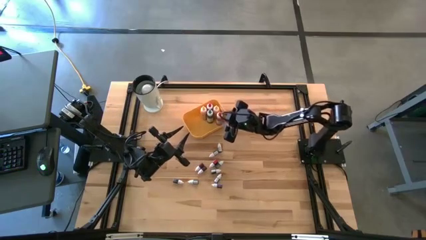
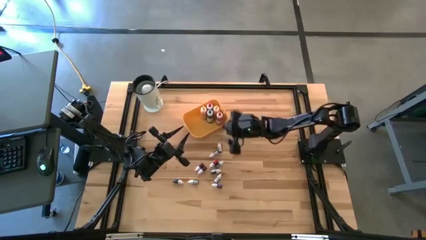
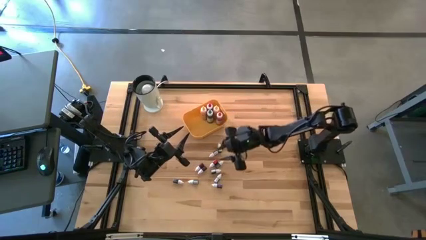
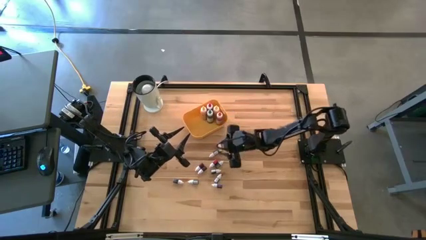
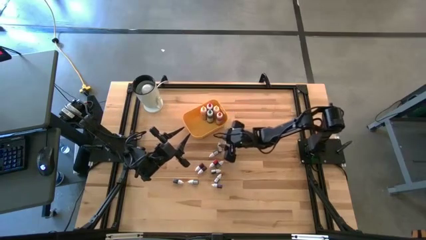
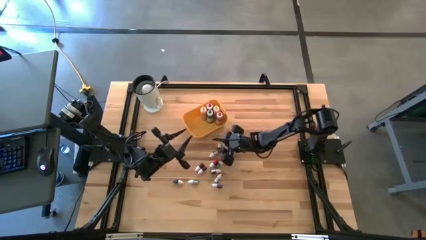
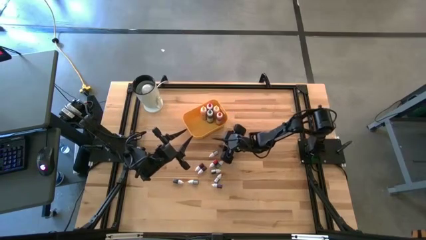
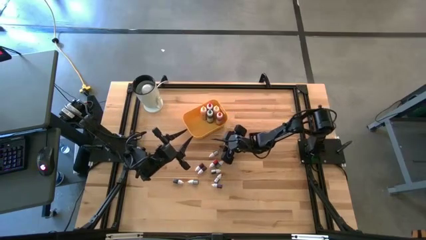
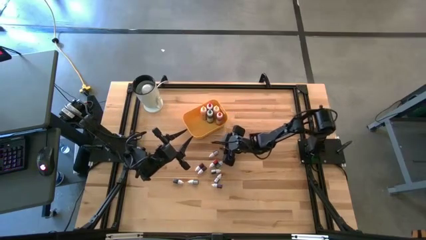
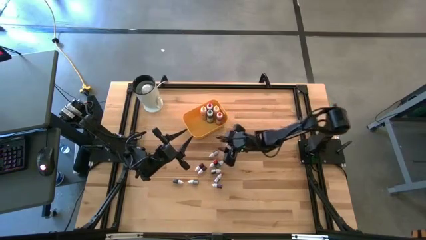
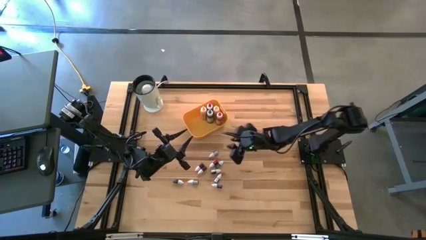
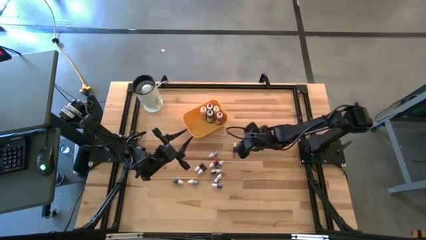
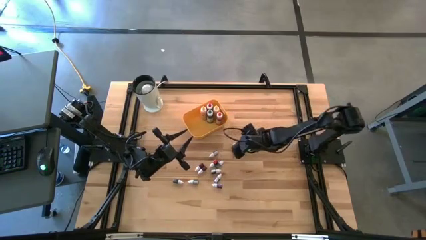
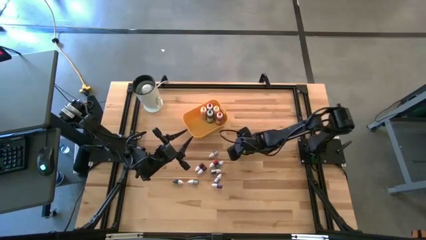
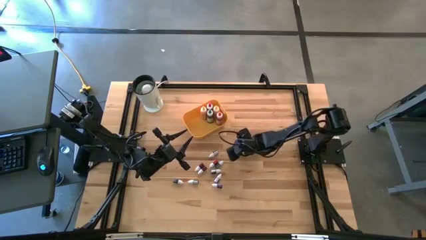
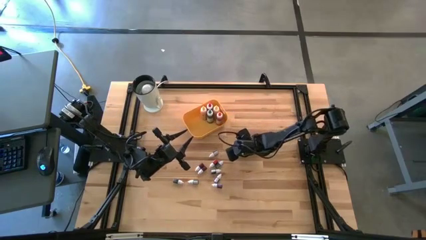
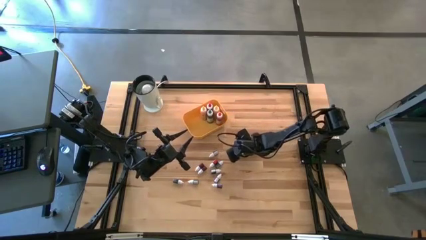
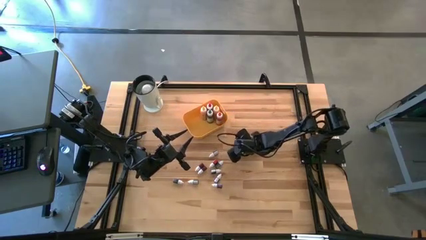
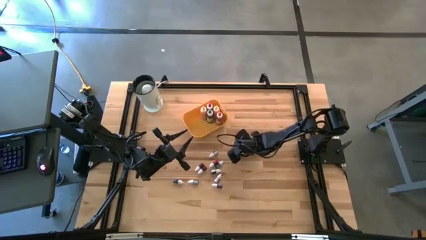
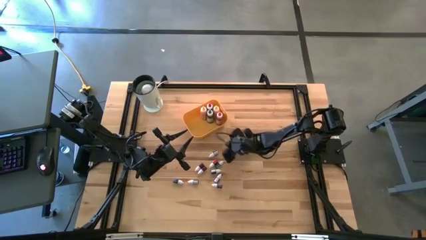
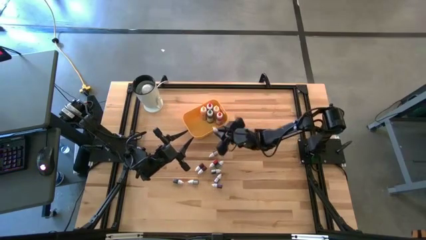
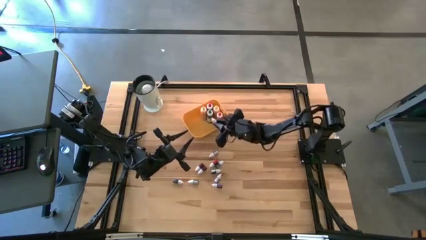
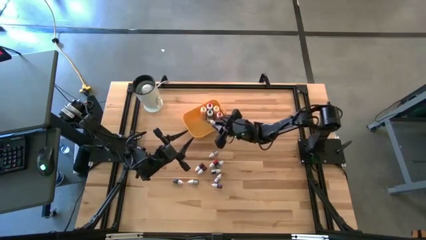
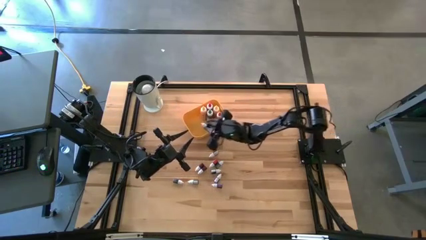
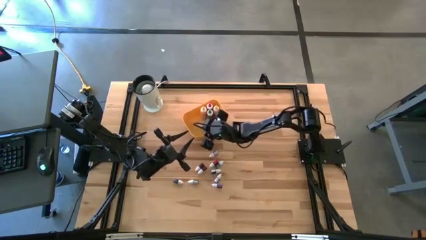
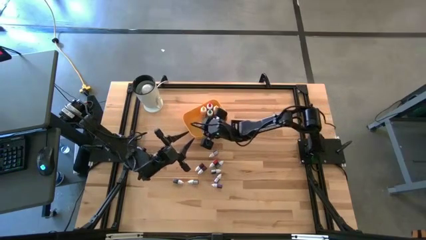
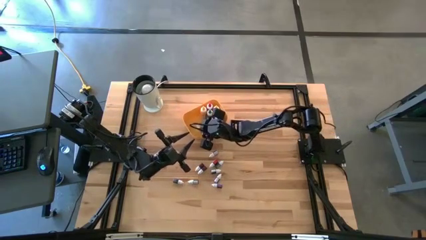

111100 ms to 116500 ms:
Task: Pick & Place food coloring
Put the small dark green food coloring bottle into the yellow bin

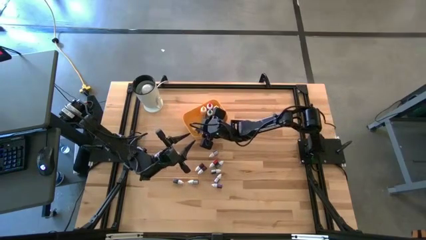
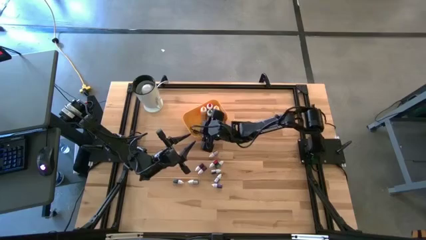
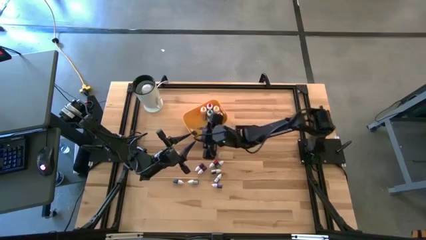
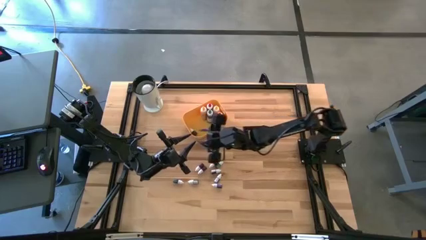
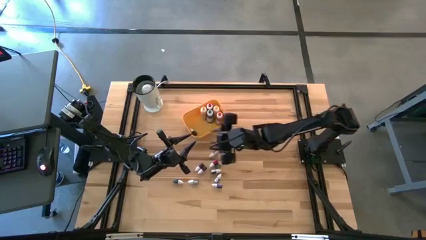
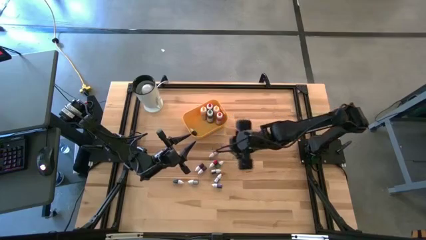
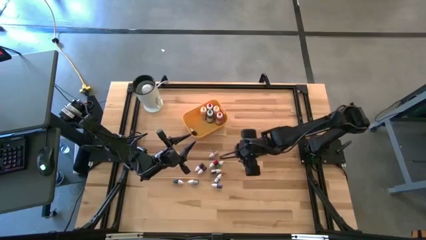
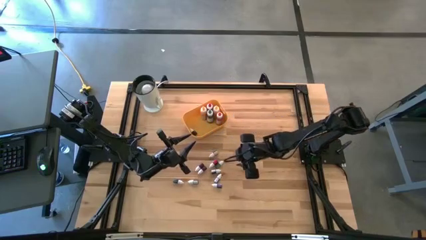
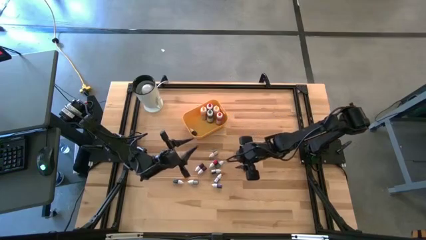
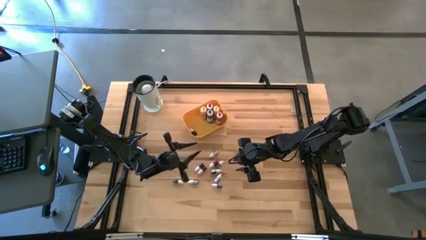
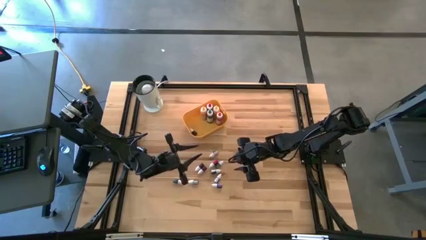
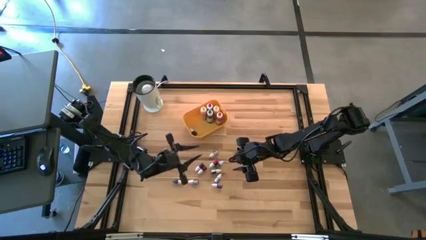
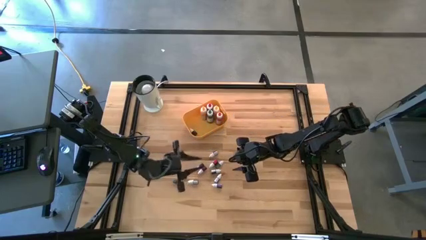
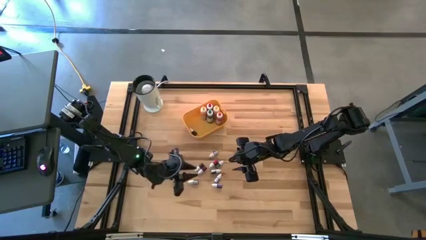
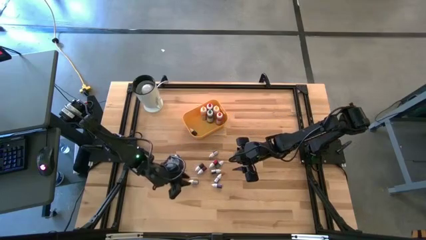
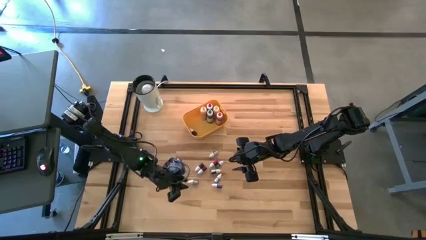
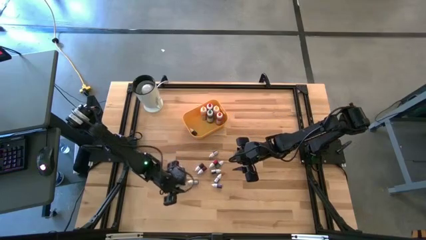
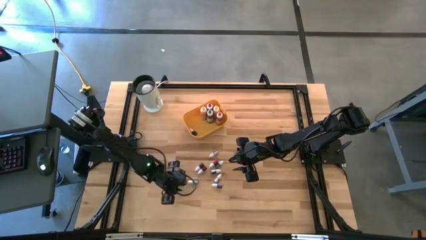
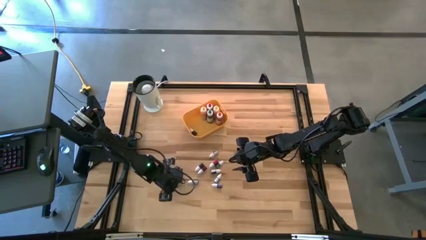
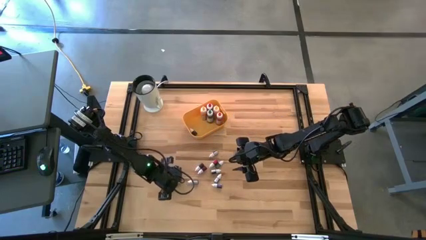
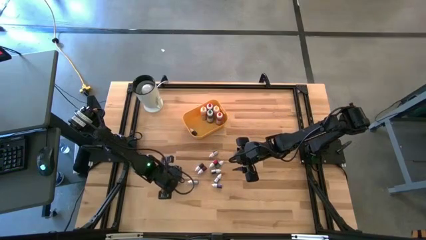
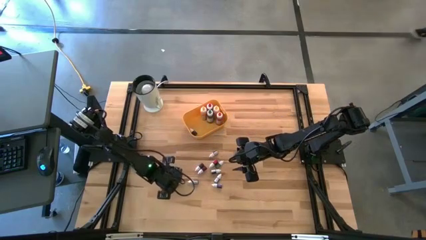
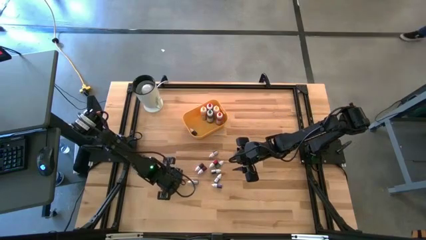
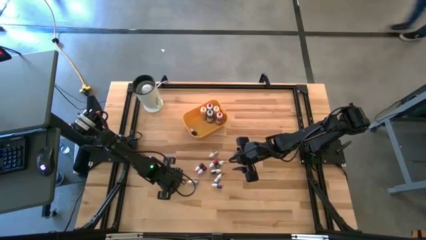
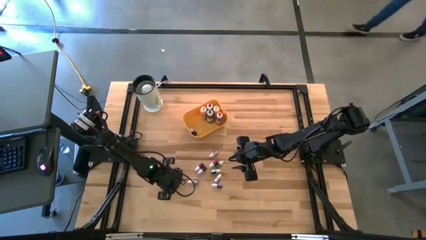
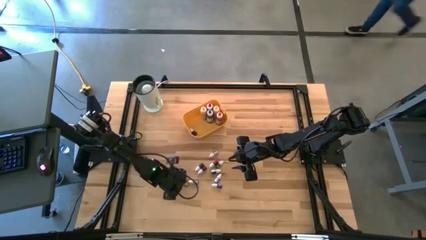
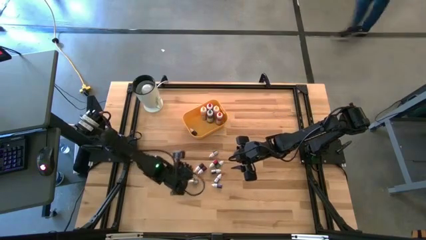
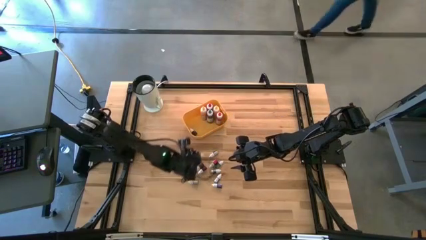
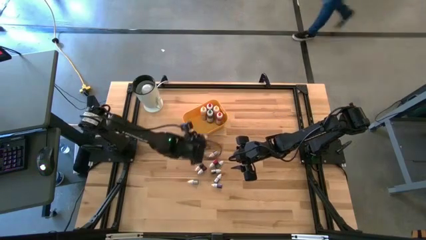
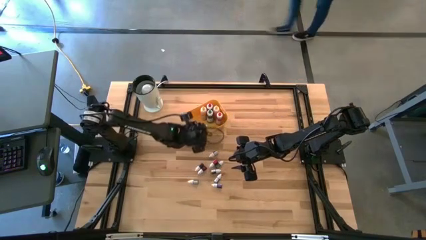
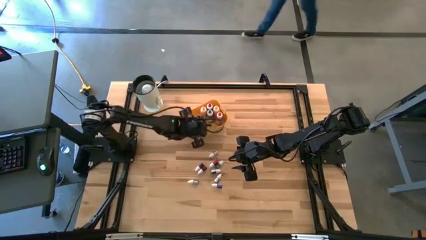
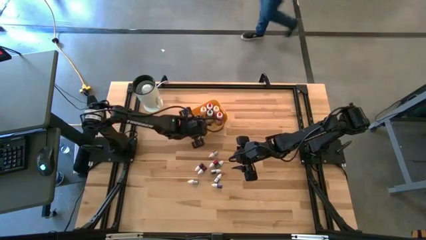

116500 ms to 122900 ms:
Put the small dark green food coloring bottle into the yellow bin

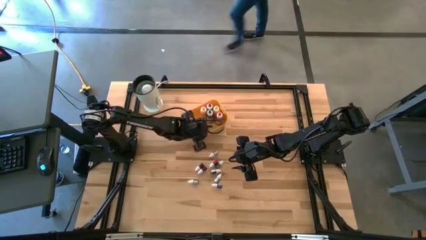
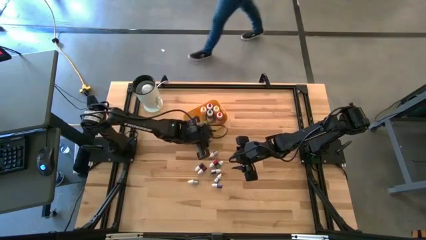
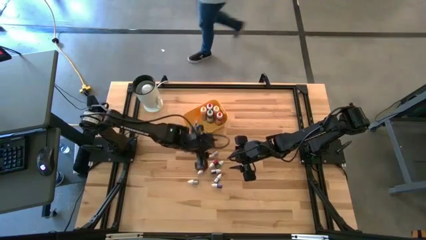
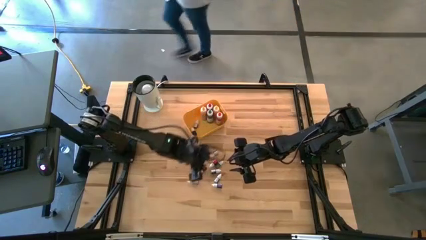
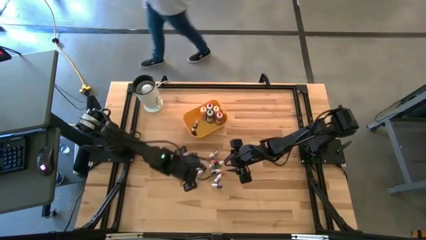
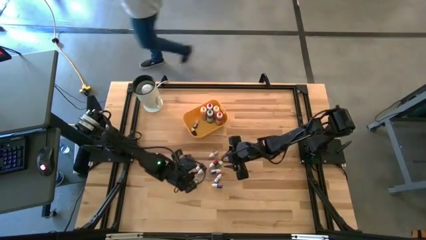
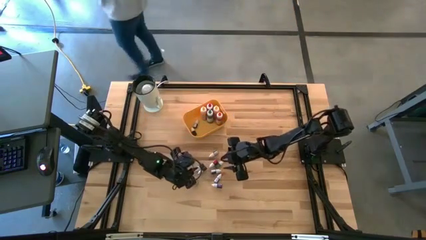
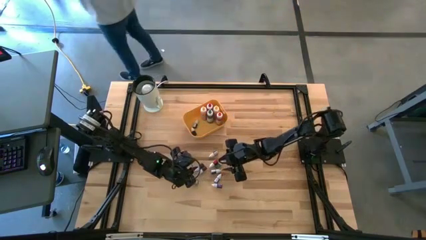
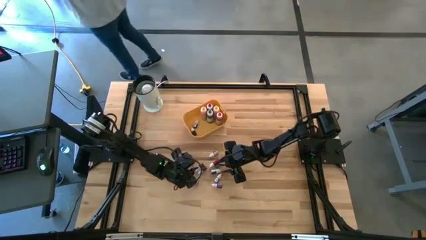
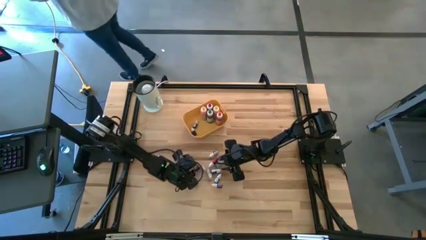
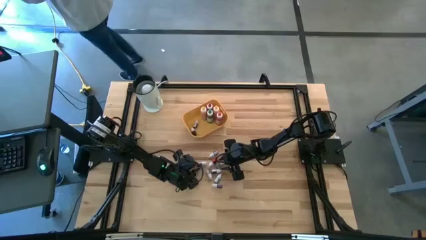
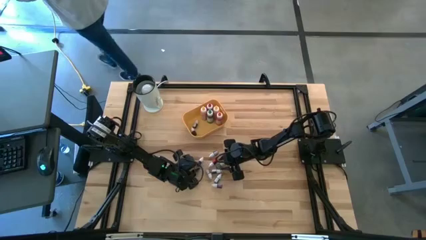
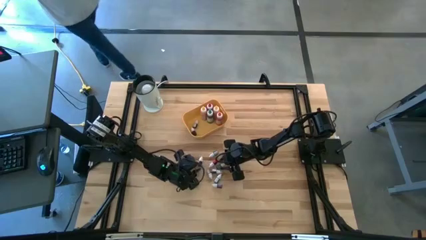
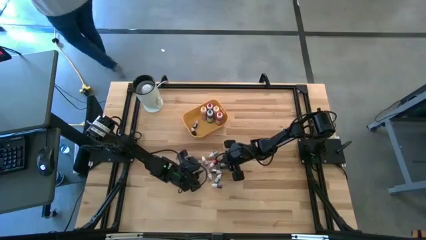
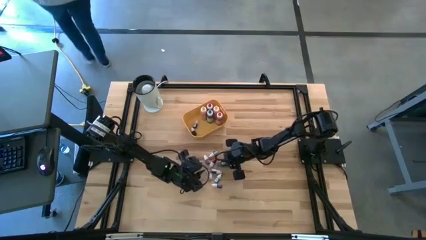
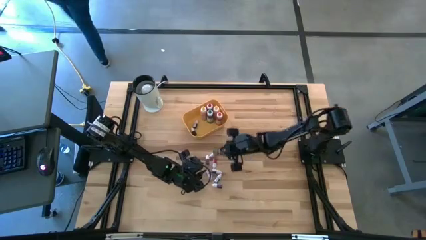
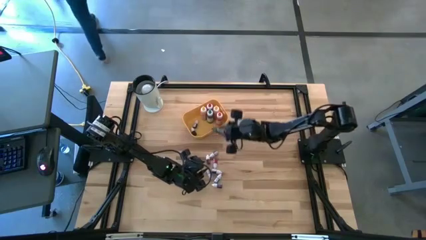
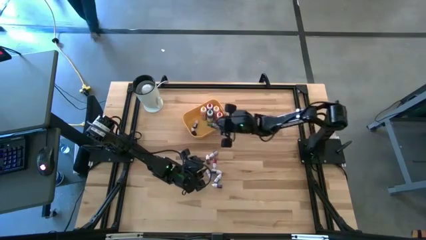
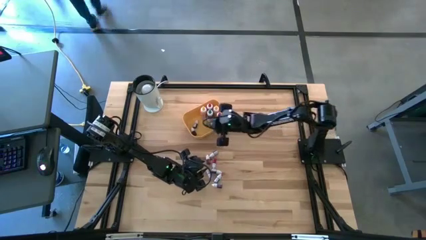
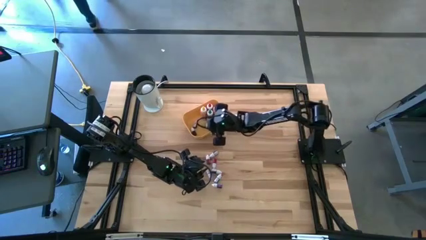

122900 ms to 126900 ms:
Put the small dark green food coloring bottle into the yellow bin

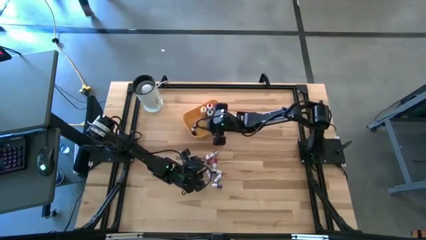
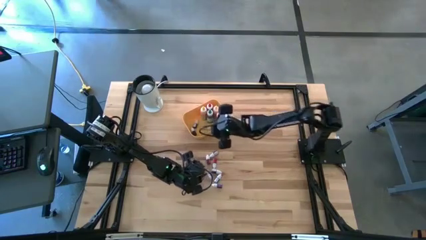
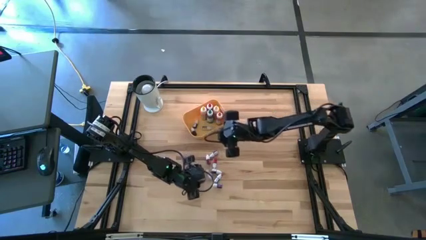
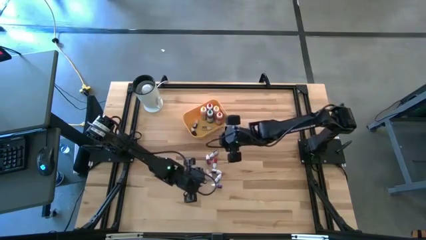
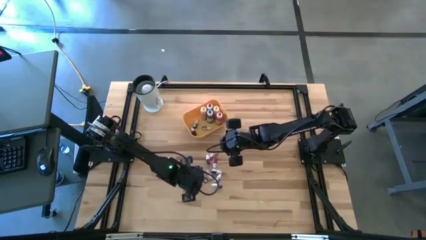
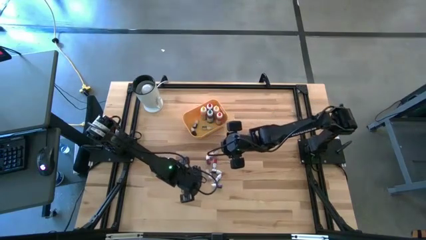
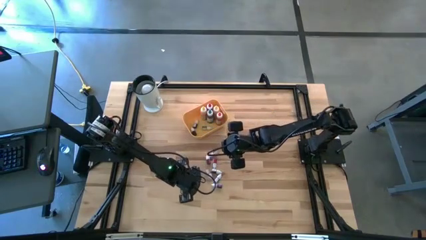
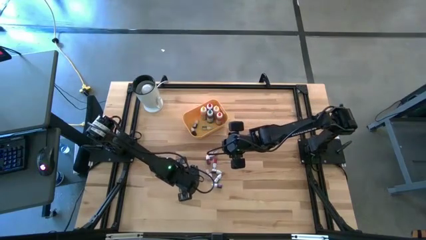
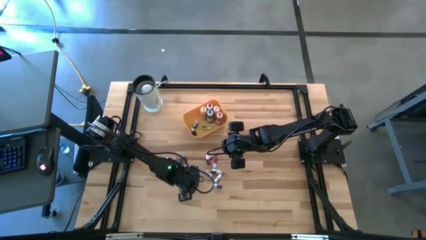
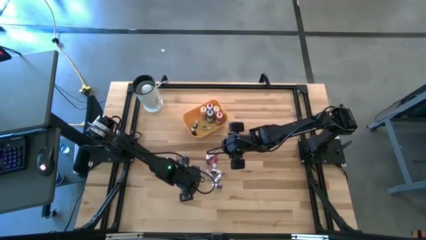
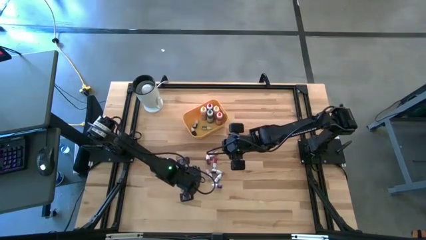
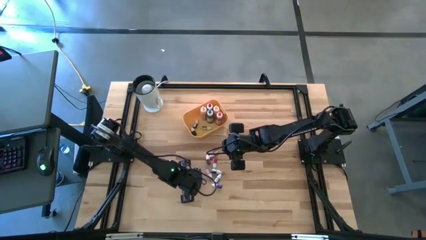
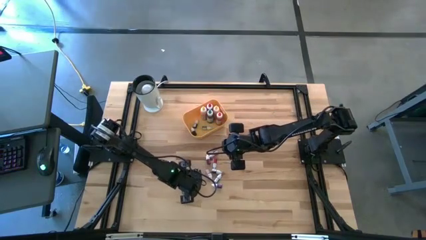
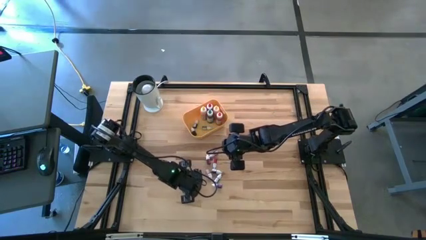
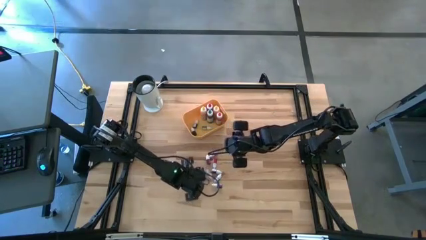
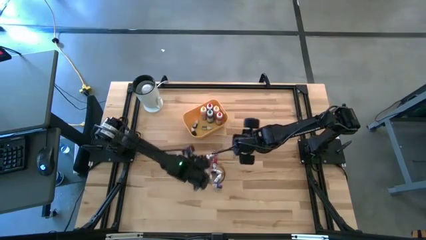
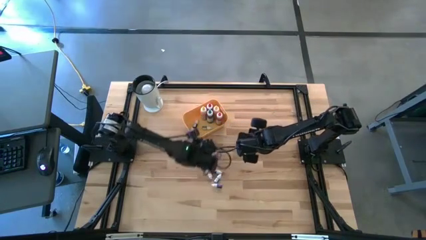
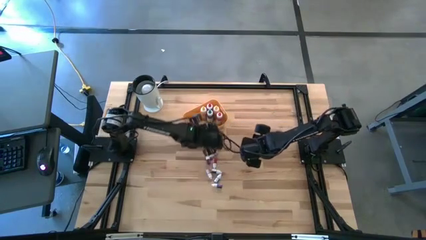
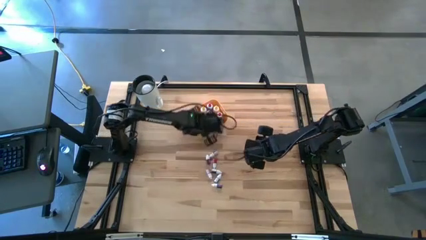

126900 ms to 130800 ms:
Put the small dark green food coloring bottle into the yellow bin
